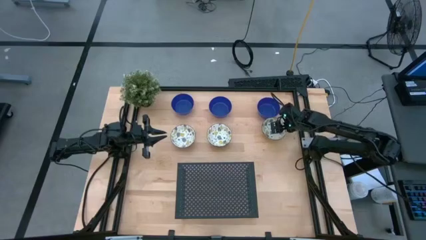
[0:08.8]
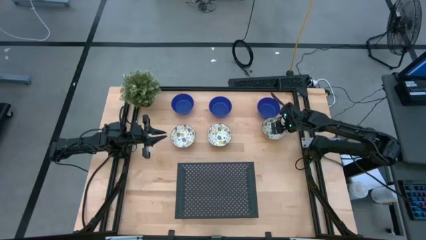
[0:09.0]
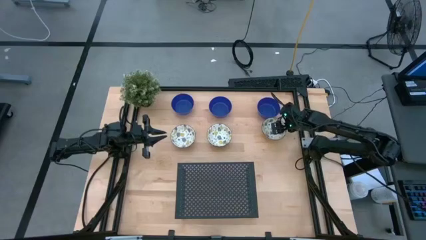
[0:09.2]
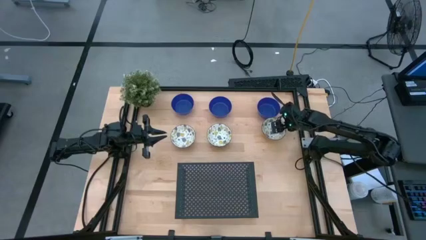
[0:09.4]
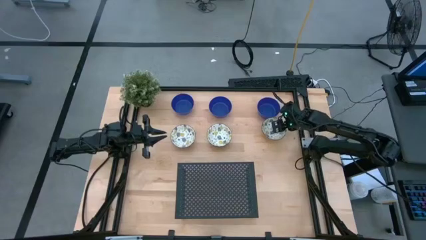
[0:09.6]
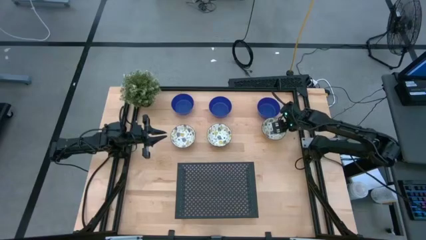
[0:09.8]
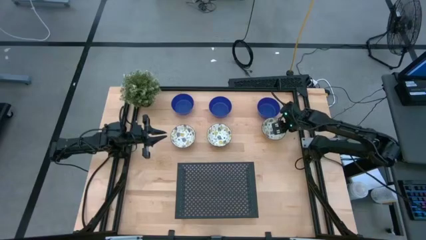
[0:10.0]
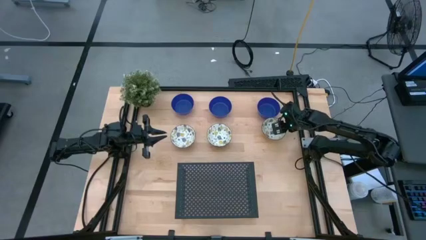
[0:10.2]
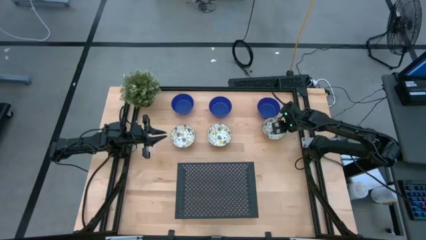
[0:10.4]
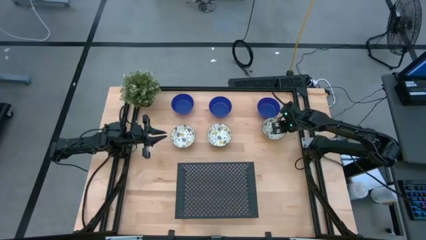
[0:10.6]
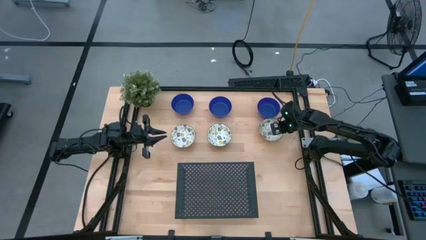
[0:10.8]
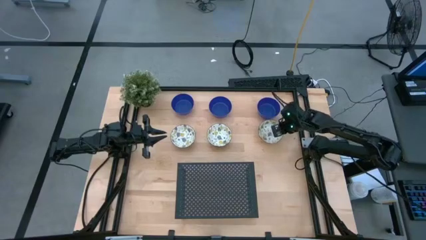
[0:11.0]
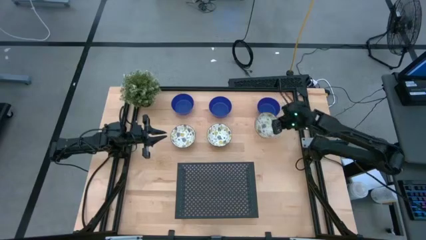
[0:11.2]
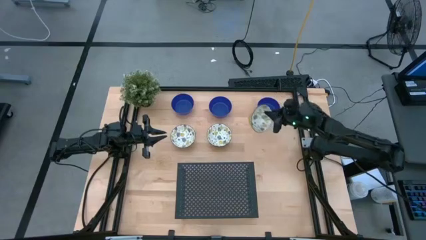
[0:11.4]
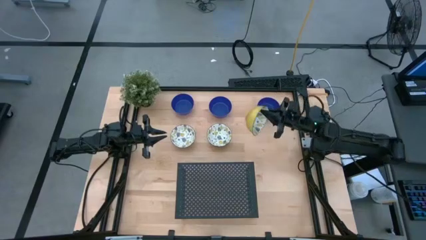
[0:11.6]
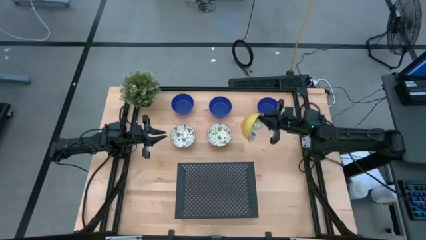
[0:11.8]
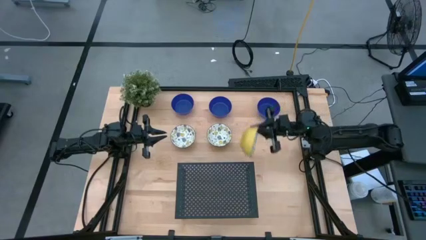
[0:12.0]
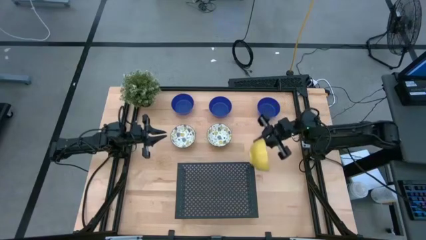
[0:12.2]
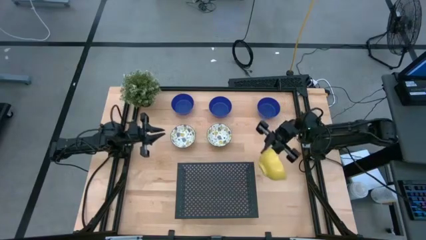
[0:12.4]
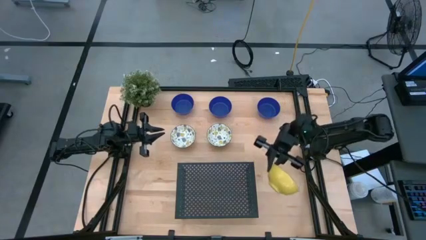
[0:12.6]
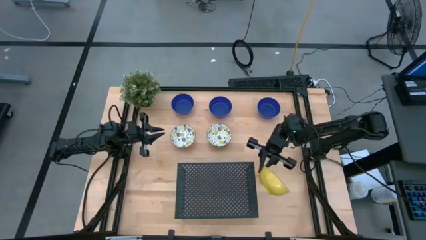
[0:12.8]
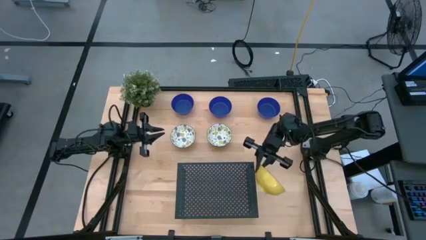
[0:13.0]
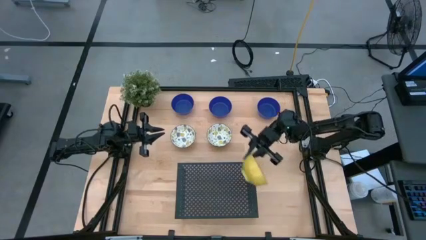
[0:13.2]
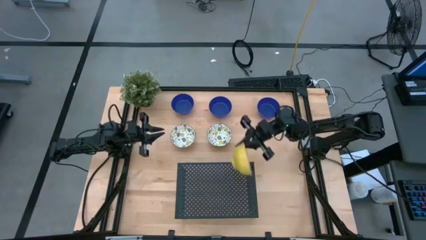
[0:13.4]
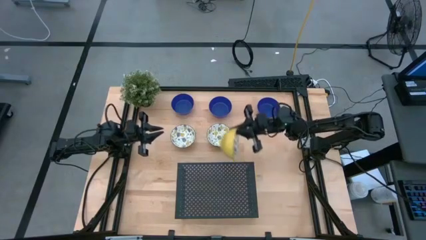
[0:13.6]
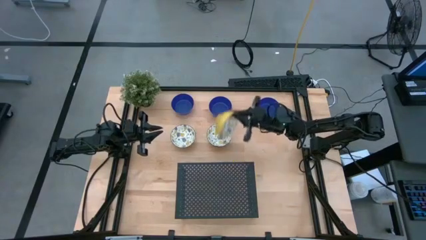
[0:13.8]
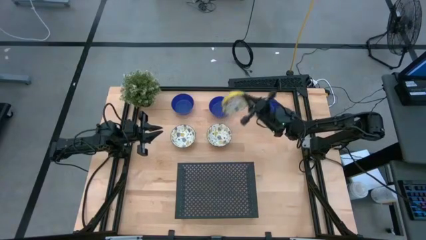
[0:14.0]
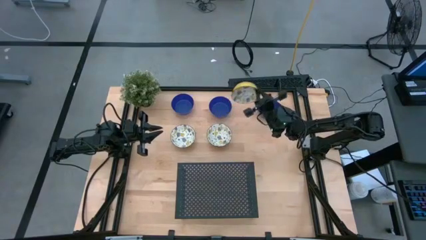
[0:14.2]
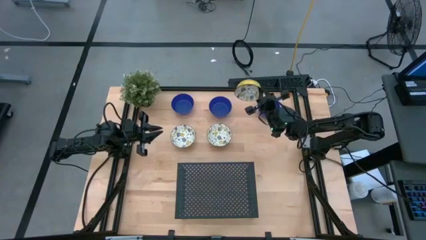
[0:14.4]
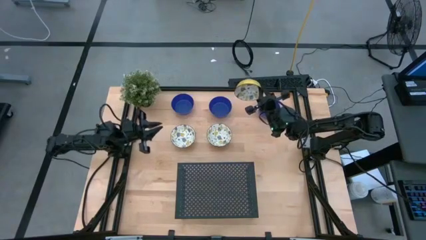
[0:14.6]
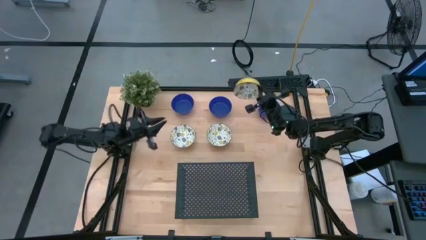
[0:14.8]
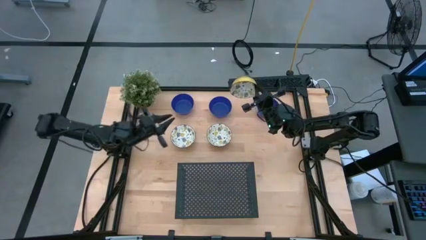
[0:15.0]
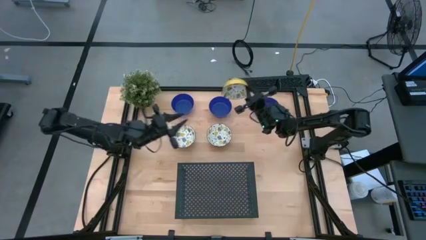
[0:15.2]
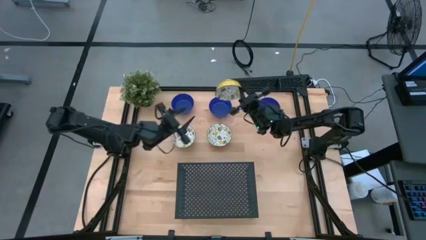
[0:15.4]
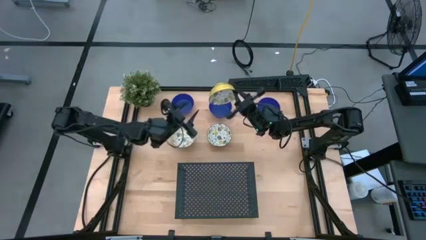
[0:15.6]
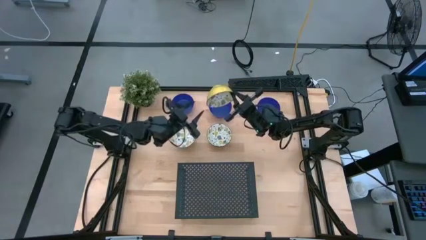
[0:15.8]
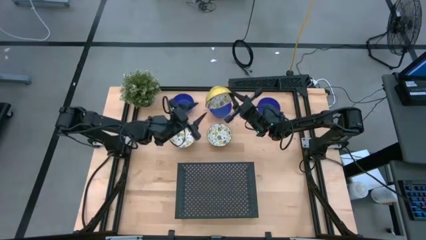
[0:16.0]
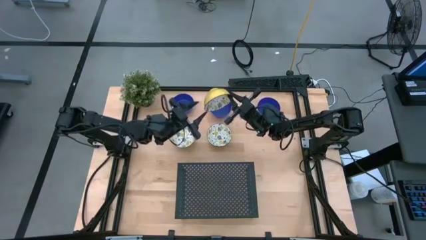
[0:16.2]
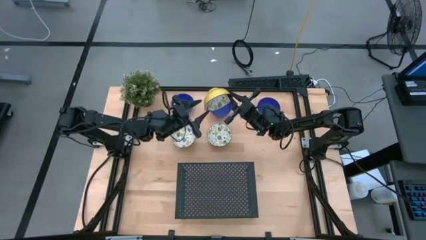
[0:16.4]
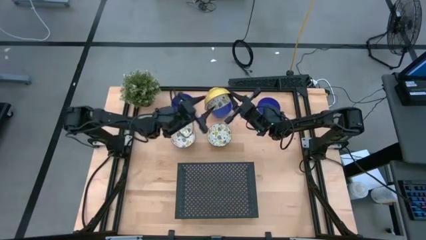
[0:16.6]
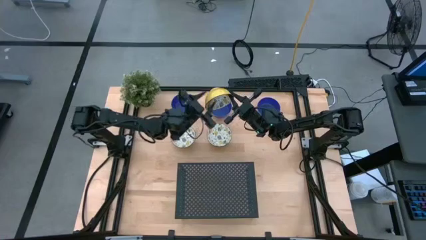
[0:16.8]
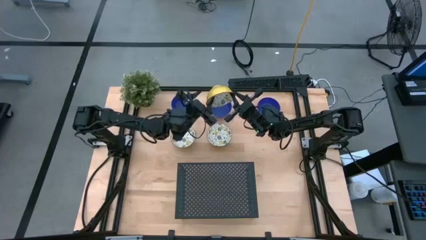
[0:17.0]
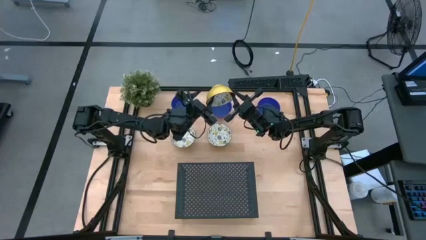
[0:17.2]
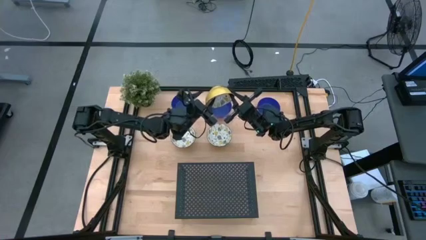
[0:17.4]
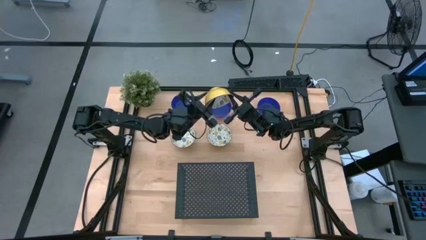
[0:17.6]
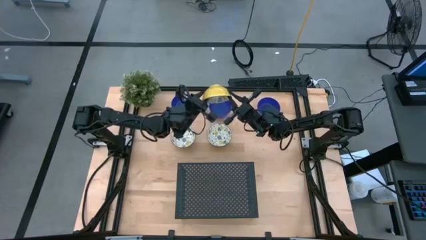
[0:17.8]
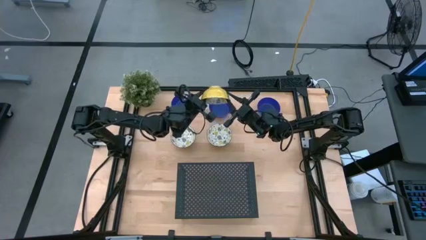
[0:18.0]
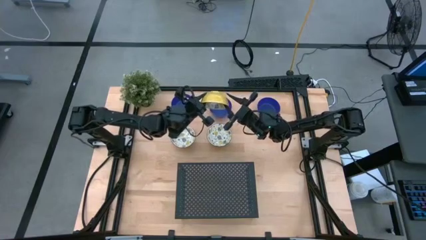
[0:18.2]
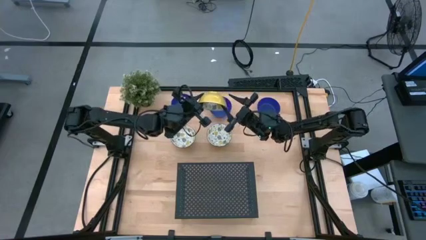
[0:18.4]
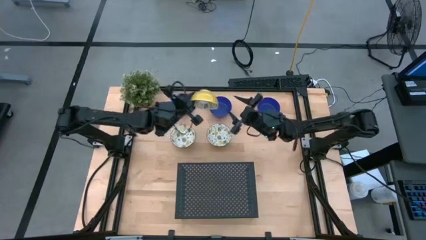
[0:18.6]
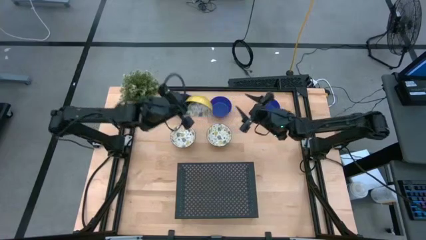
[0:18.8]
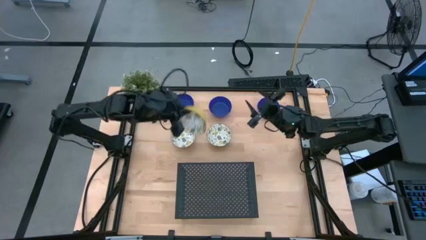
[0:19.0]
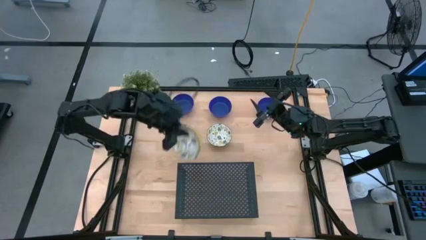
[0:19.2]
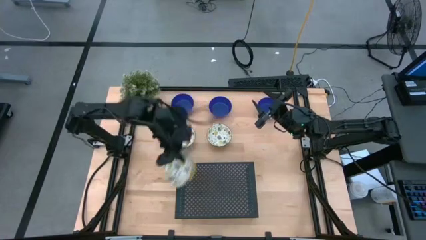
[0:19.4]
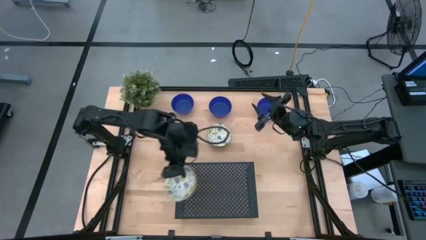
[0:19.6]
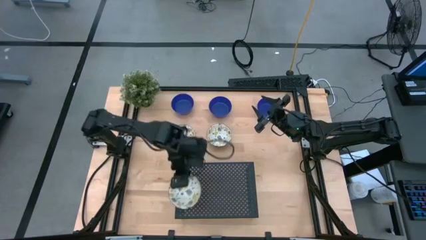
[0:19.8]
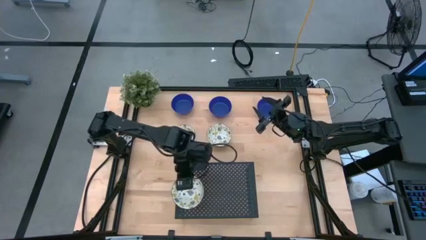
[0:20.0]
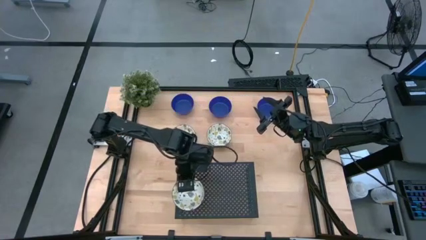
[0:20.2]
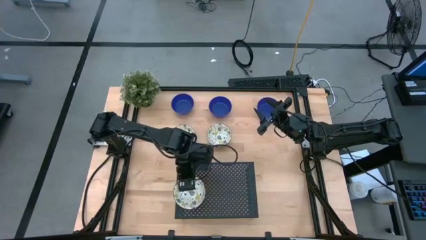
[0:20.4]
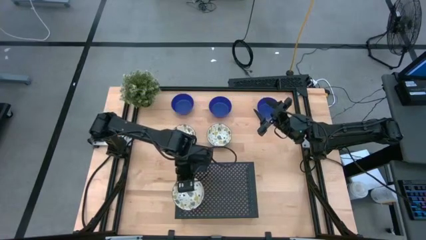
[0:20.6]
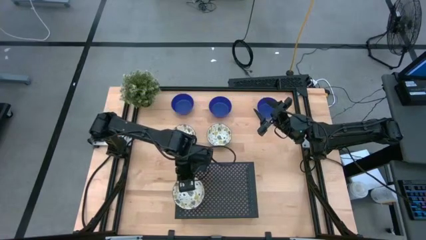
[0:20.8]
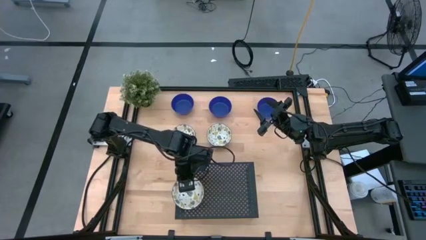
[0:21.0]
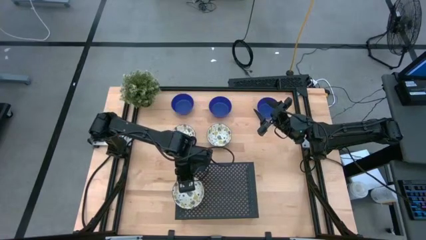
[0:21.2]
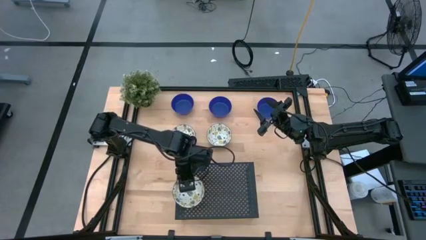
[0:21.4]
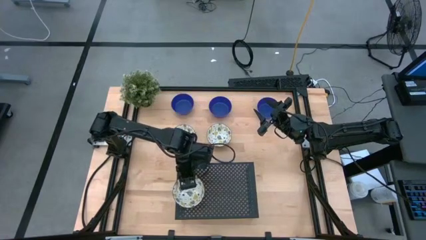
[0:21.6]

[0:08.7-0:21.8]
Task: Pick & Place Mini bowls
Put the right patterned yellow bowl on the shelf

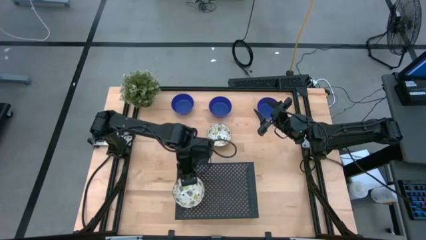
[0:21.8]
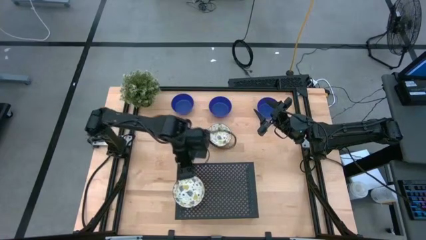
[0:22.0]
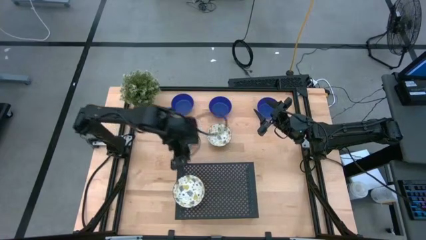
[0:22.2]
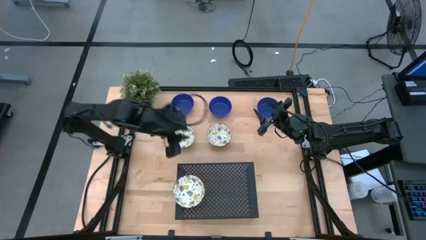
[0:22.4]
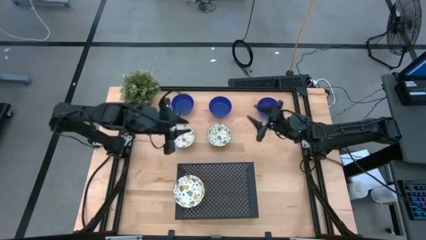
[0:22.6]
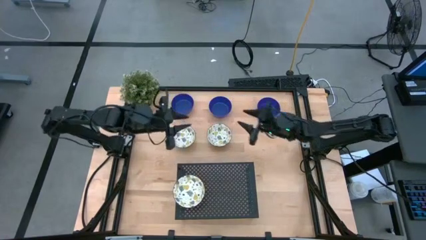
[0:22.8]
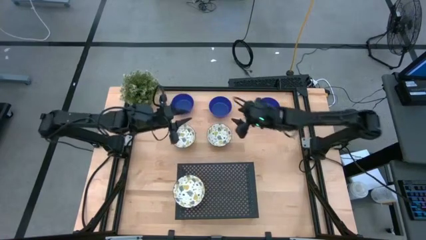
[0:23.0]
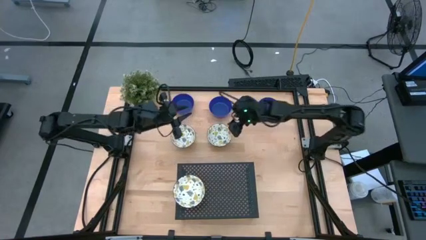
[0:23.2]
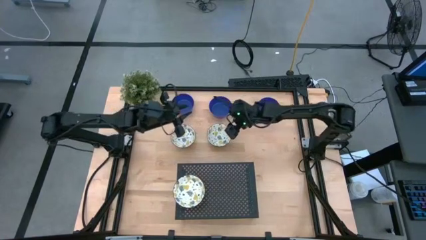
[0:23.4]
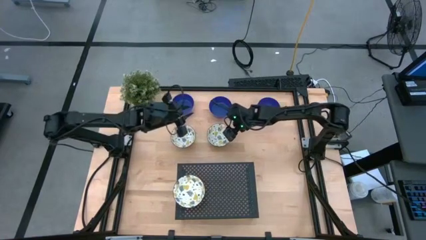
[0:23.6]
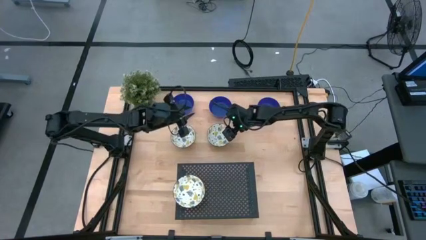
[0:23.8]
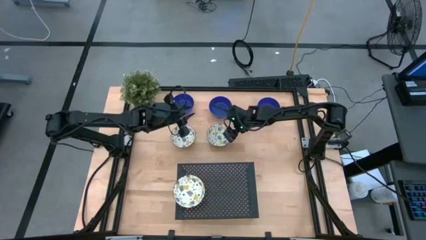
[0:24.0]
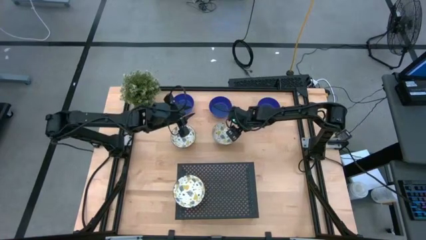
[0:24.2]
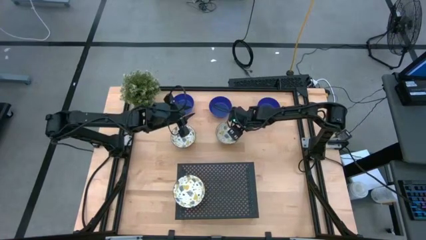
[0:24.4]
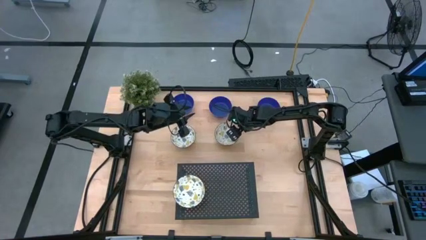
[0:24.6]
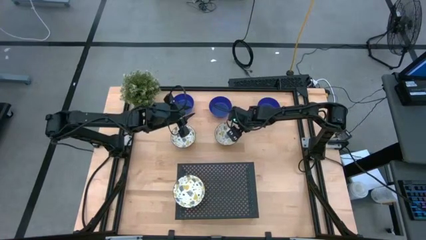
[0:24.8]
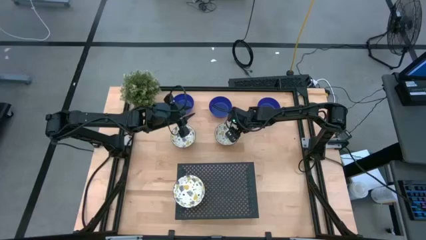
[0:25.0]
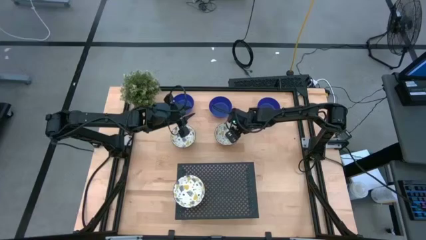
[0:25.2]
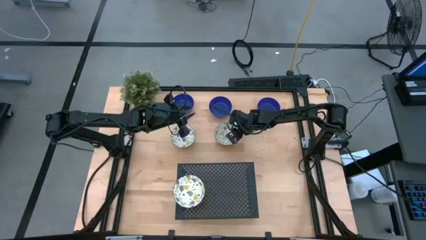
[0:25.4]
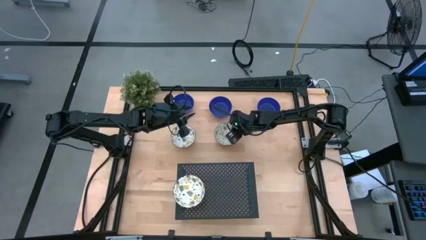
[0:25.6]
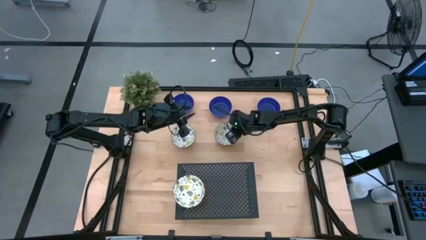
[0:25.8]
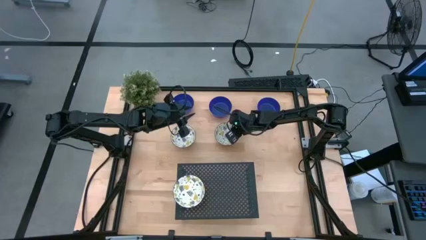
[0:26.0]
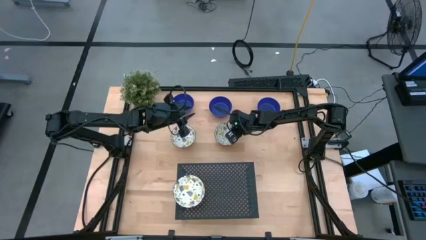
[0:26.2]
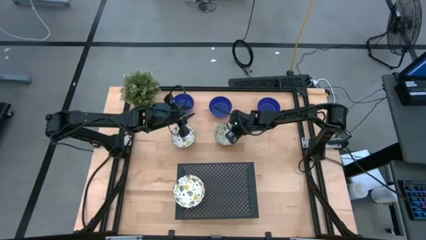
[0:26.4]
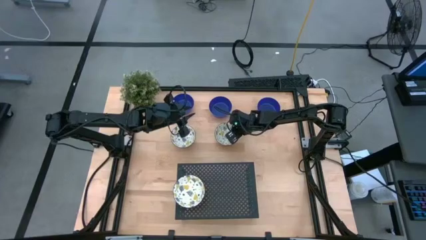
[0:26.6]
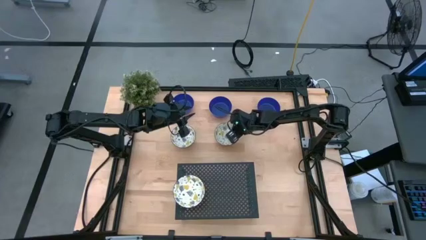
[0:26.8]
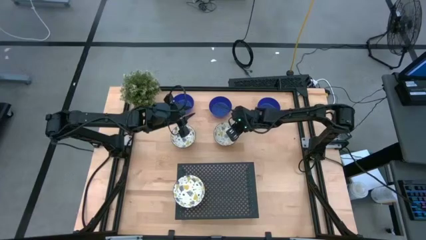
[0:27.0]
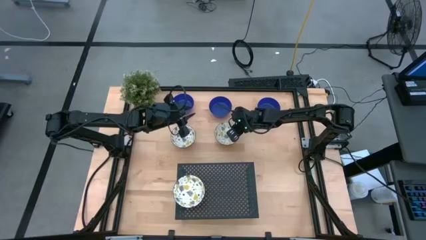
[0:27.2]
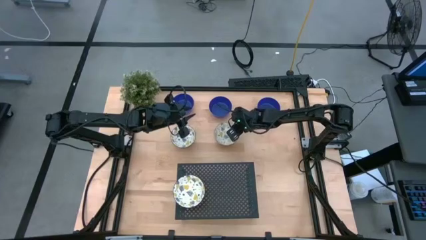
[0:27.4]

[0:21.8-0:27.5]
Stack the right patterned yellow bowl on the patterned yellow bowl on the shelf
